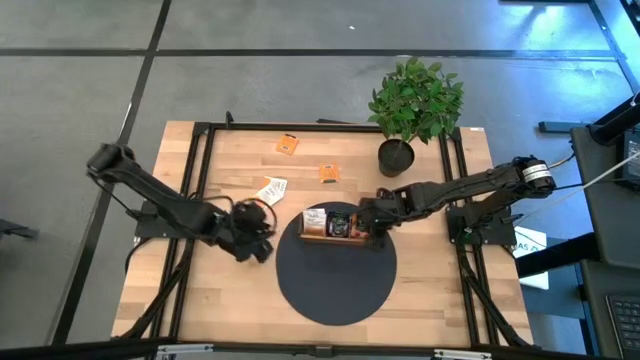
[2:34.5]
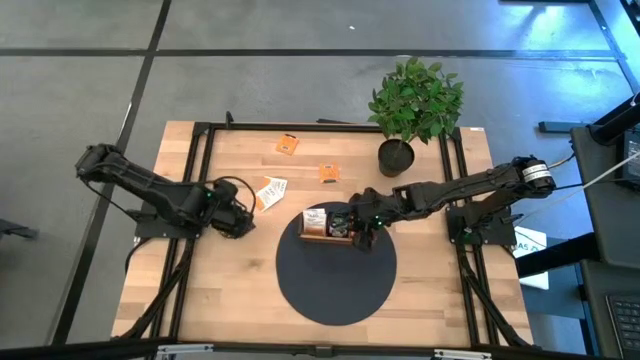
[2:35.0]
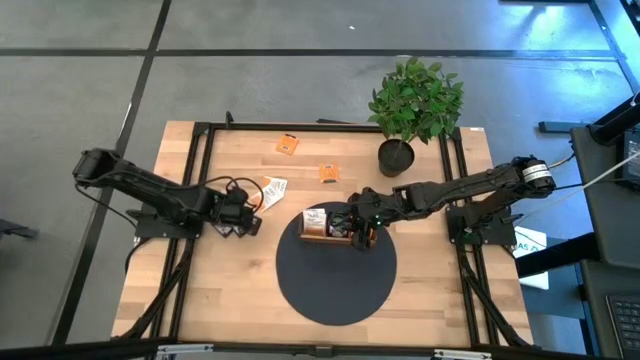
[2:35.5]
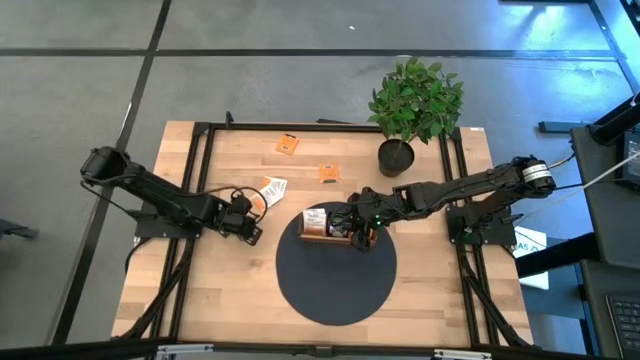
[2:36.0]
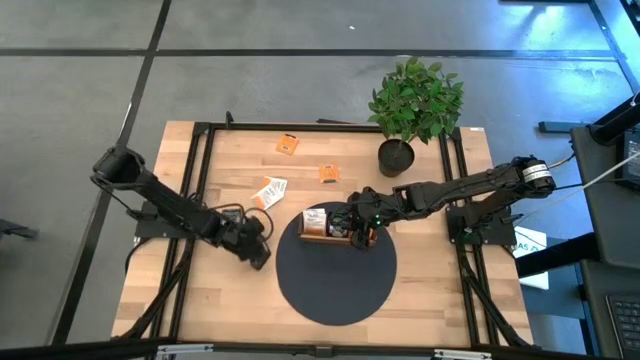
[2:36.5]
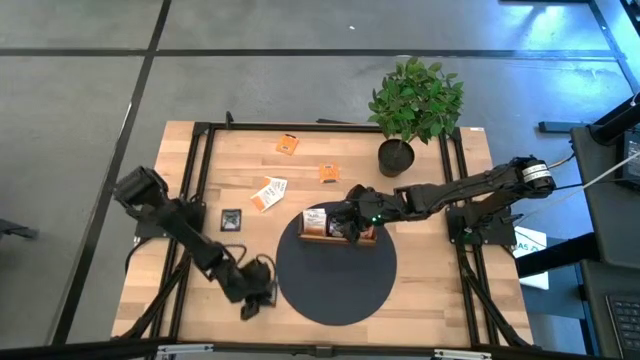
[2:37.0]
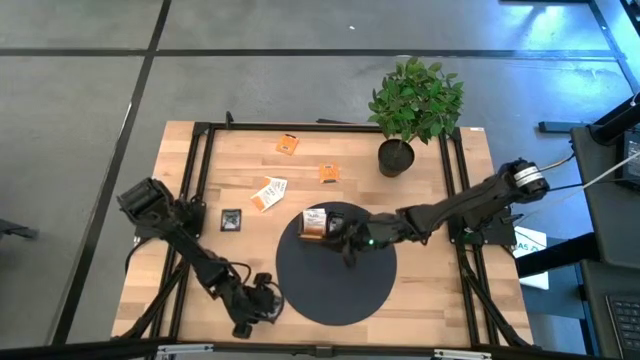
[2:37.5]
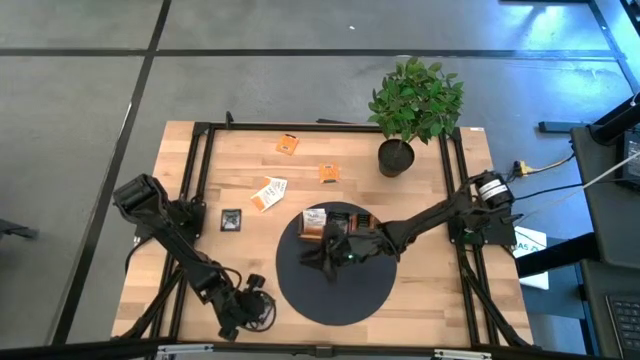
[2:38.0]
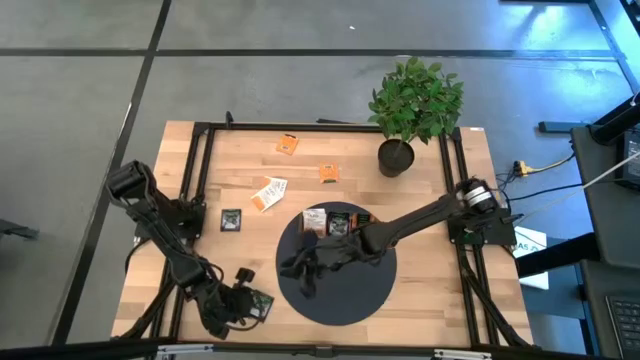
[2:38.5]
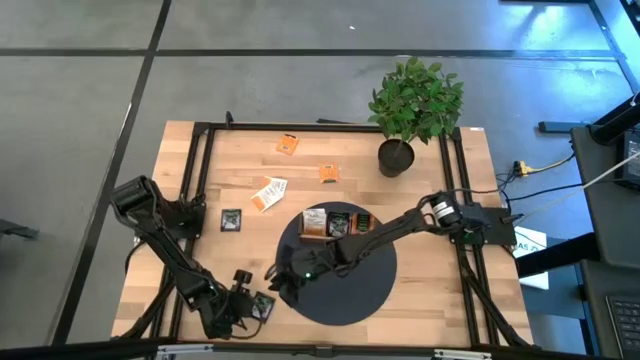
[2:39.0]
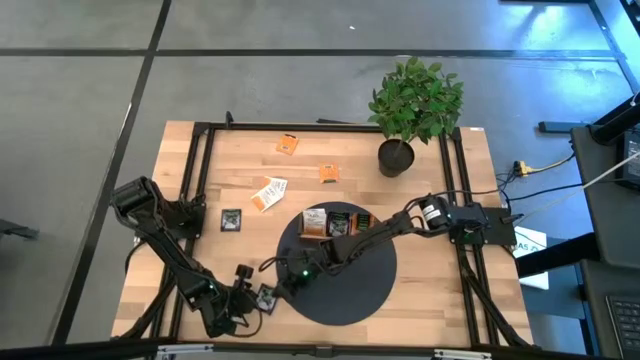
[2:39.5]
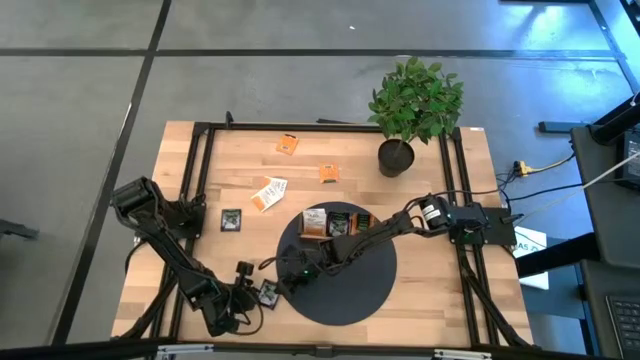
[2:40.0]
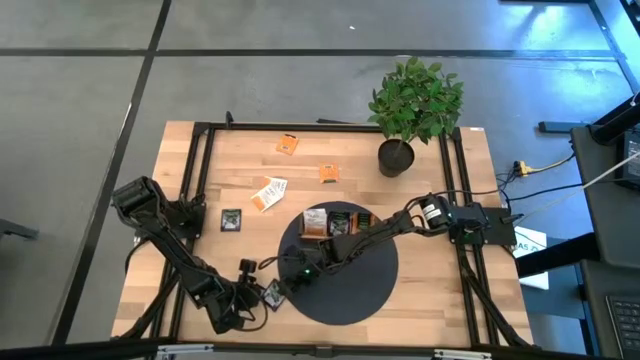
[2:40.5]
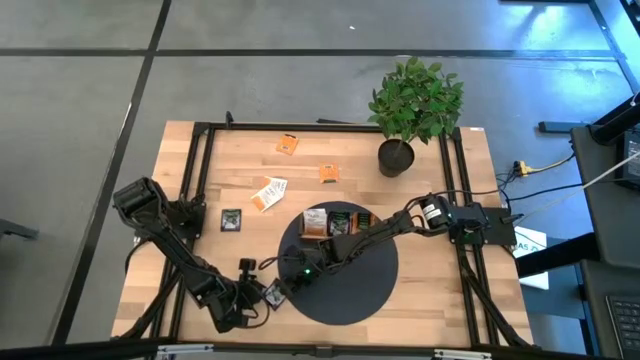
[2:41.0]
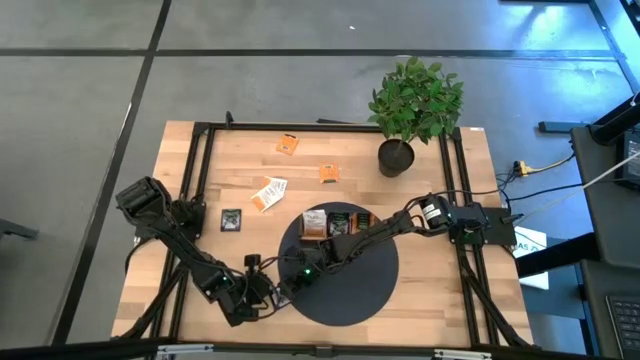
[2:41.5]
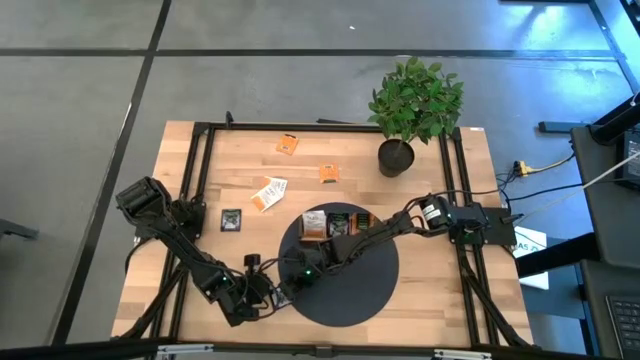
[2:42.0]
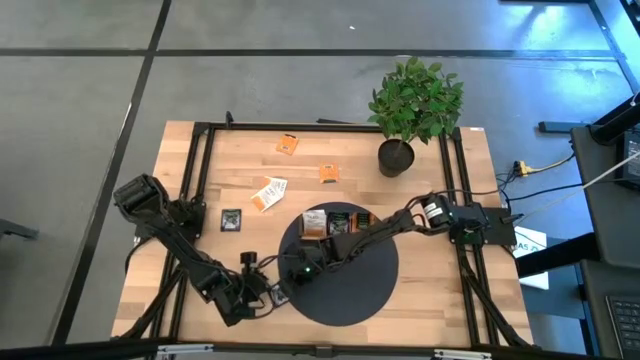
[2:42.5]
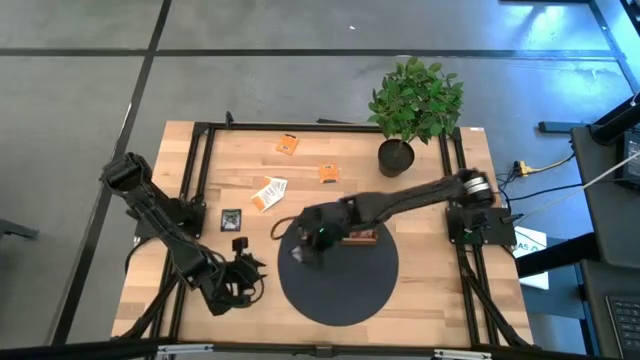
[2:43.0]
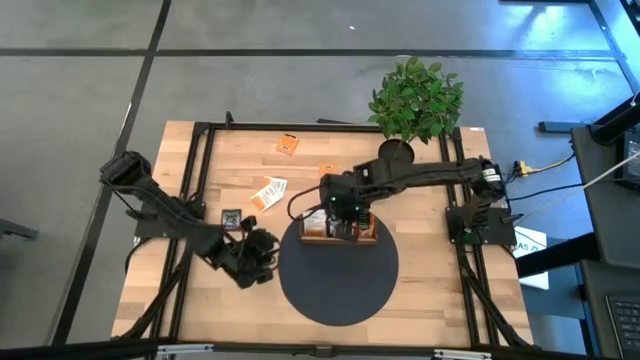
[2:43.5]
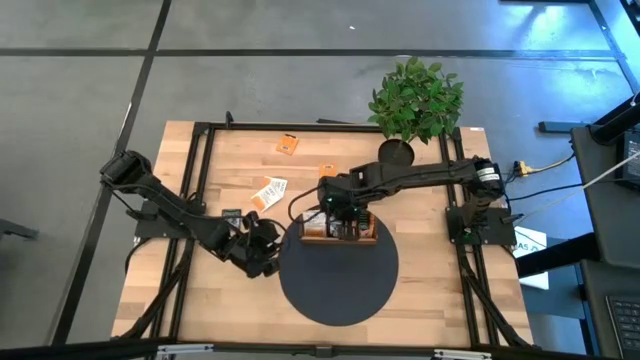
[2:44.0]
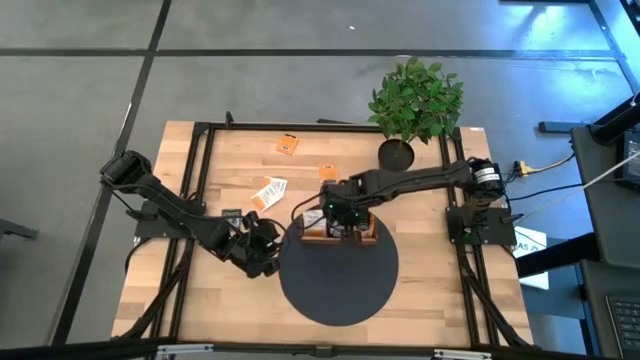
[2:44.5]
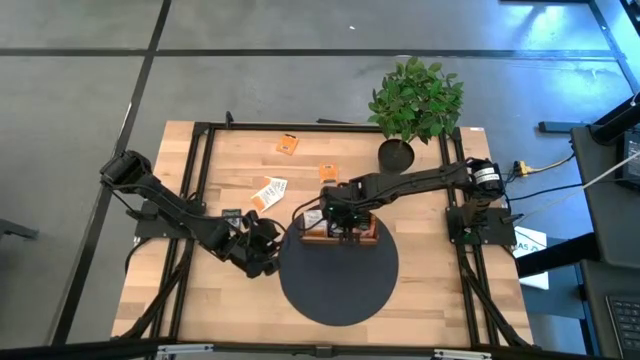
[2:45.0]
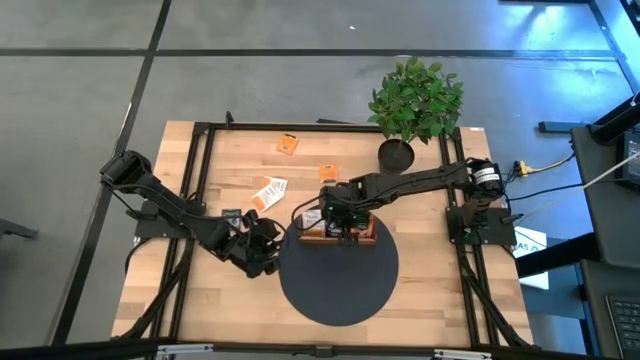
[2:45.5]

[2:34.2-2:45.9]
Task: Pick & Place Tea
Put the black tea bag into the middle section of the wooden organizer

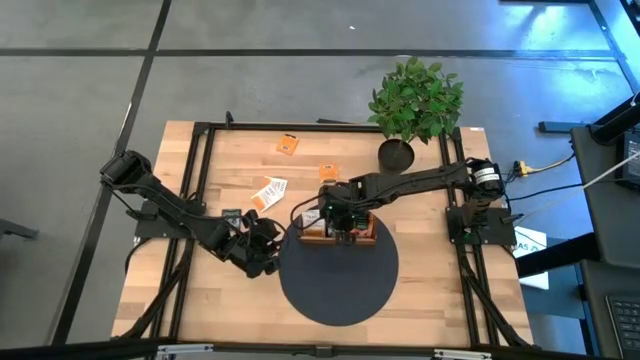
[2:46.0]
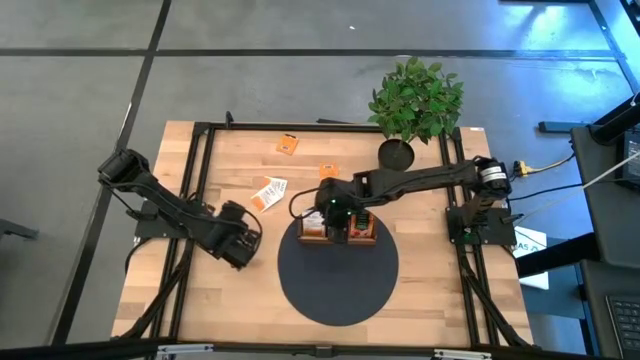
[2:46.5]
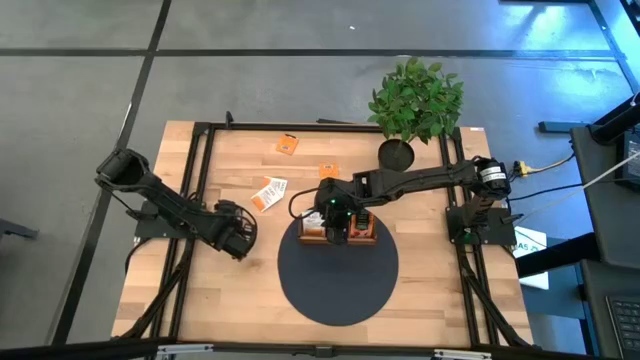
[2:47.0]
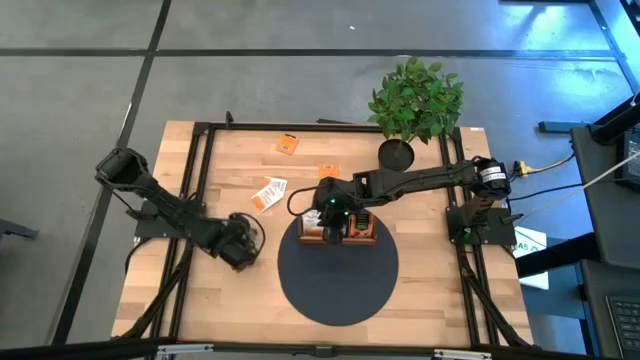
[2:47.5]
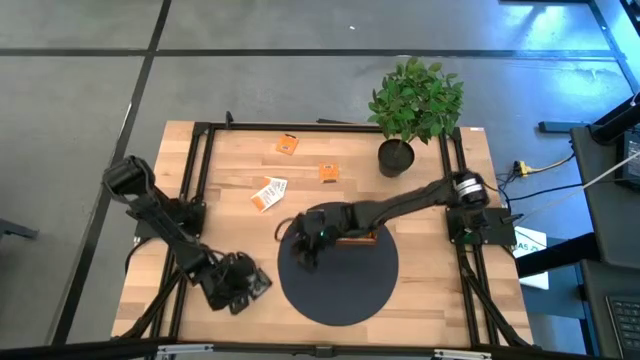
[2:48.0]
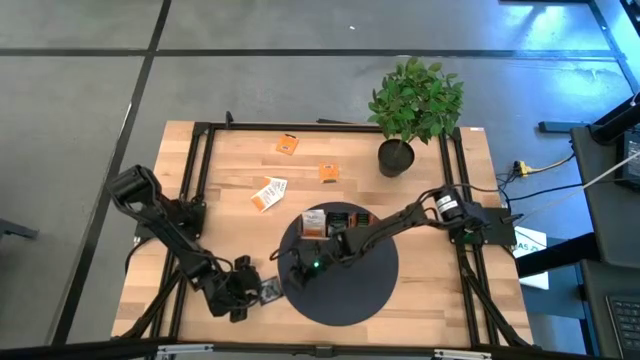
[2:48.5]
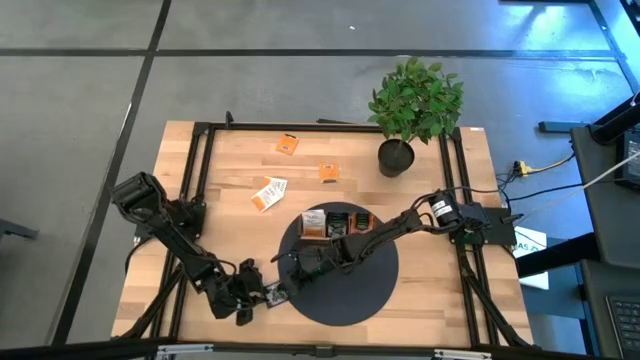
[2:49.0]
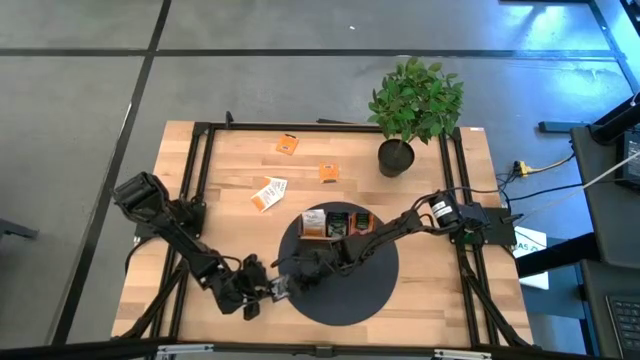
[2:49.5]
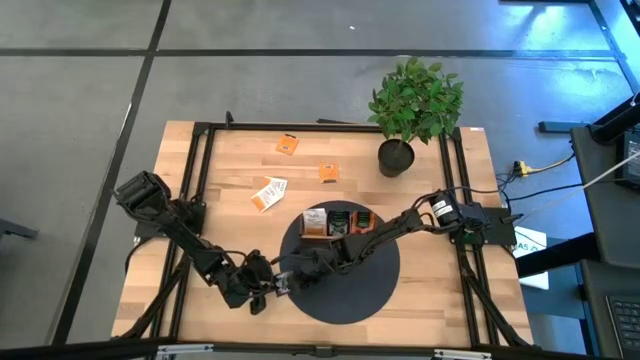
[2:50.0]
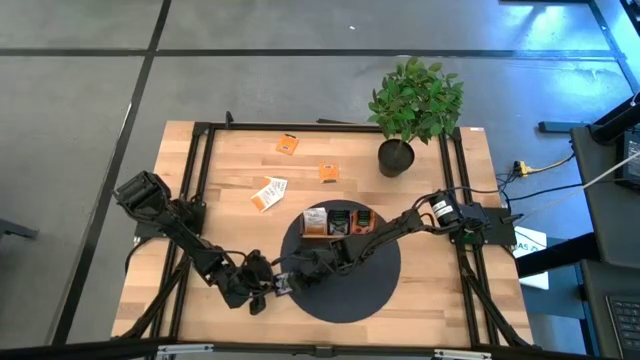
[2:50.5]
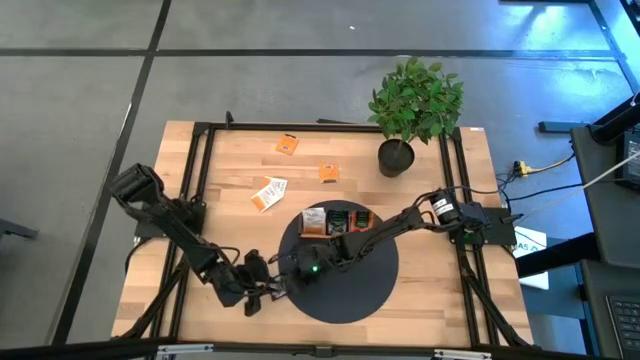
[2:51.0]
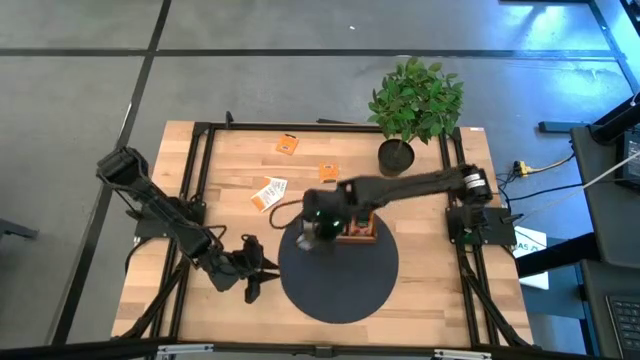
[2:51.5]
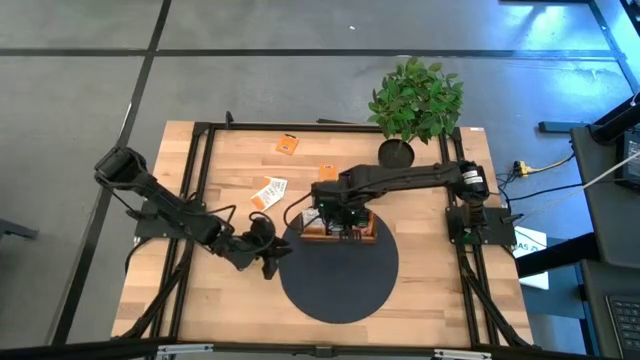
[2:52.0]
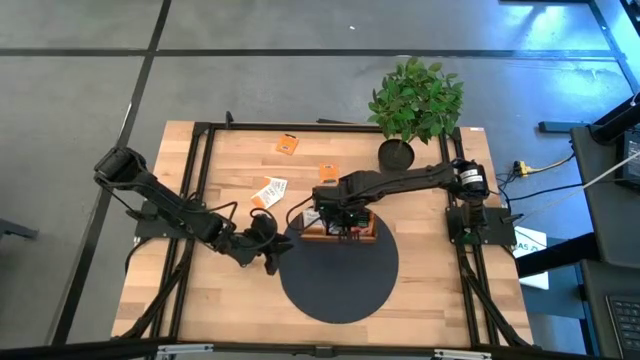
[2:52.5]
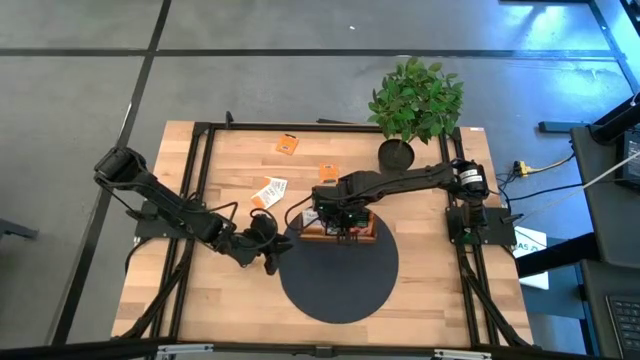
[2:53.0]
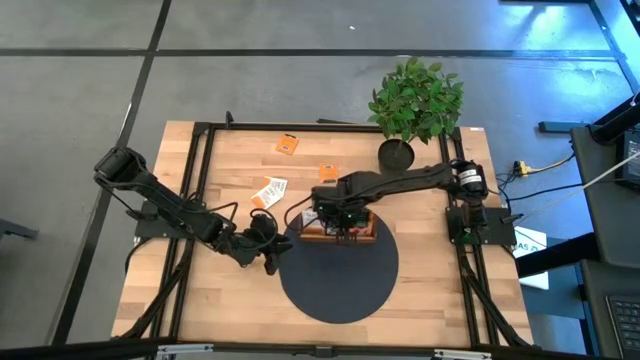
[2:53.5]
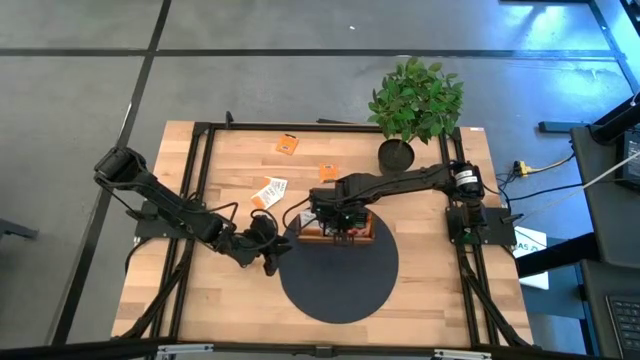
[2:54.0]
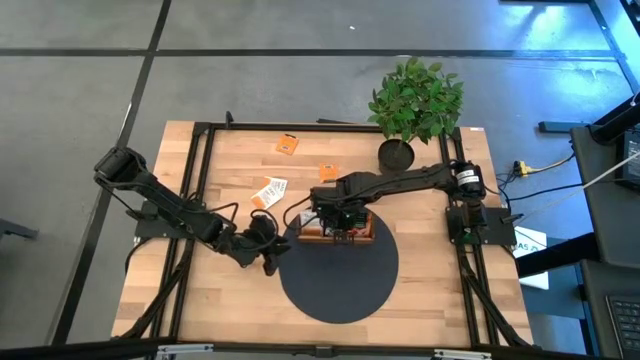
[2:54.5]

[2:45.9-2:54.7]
Put the black tea bag into the middle section of the wooden organizer
